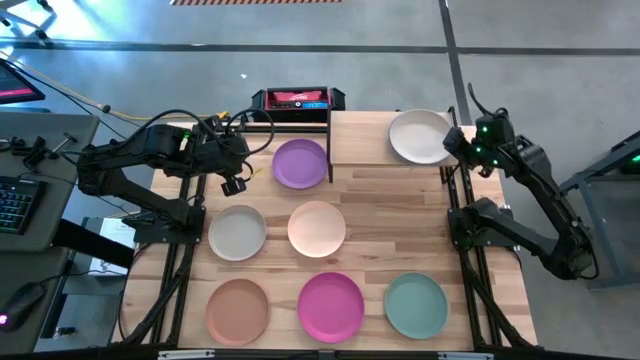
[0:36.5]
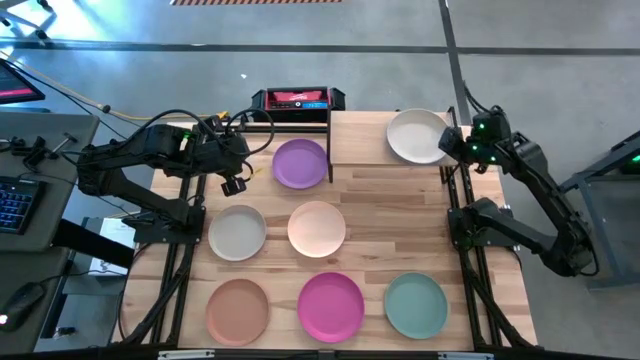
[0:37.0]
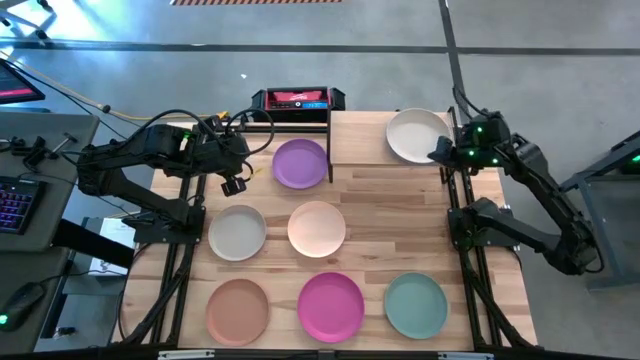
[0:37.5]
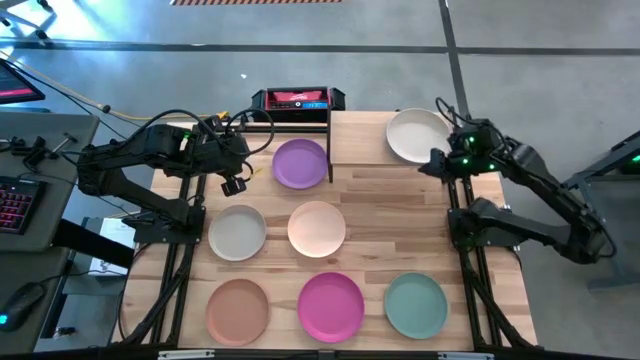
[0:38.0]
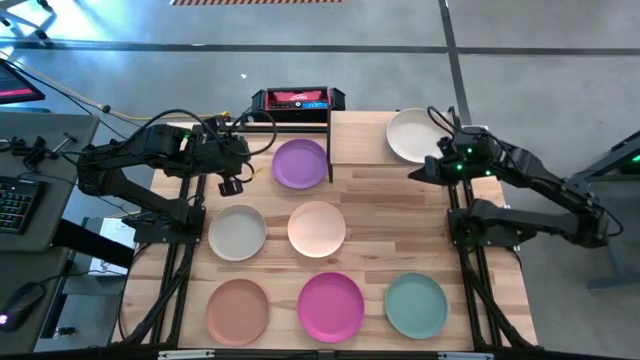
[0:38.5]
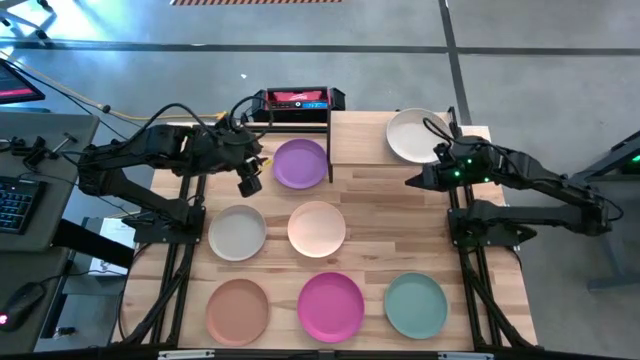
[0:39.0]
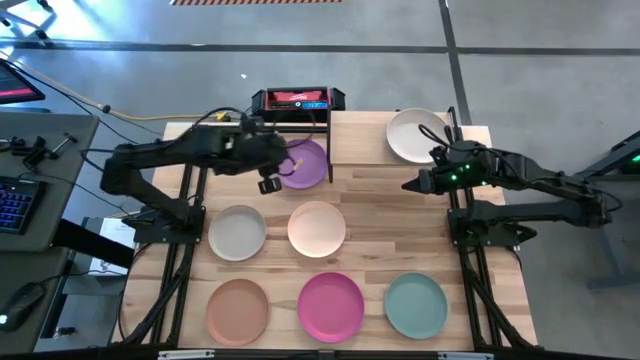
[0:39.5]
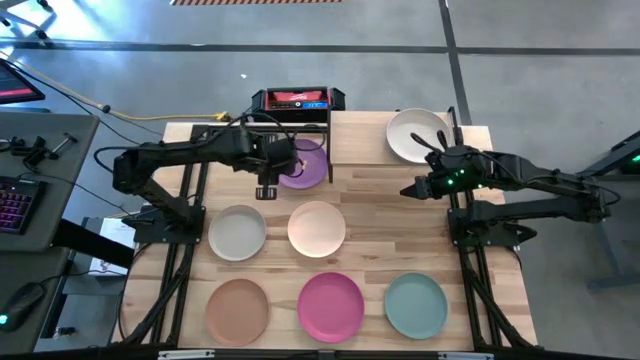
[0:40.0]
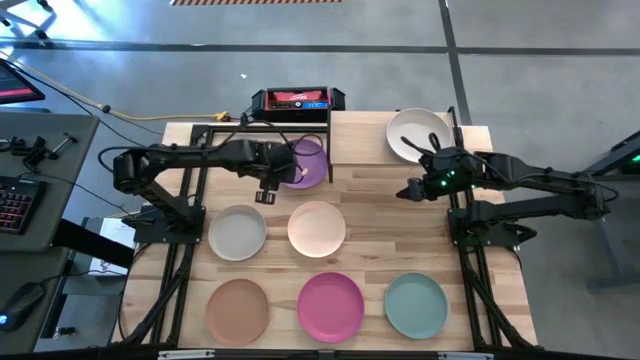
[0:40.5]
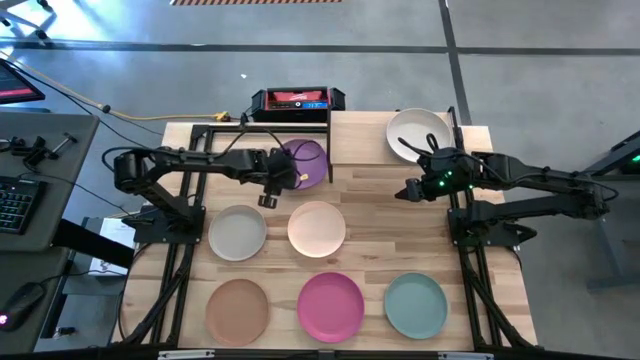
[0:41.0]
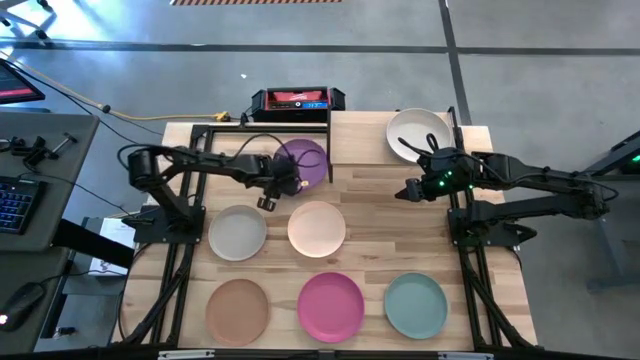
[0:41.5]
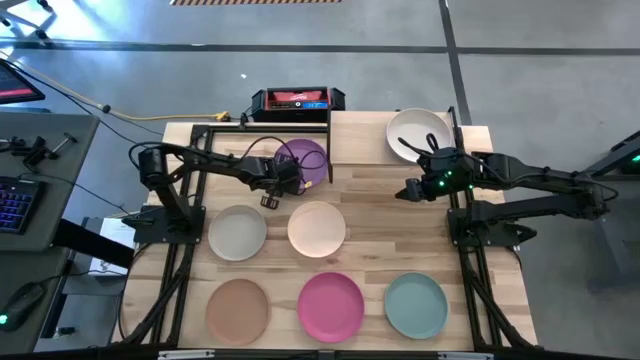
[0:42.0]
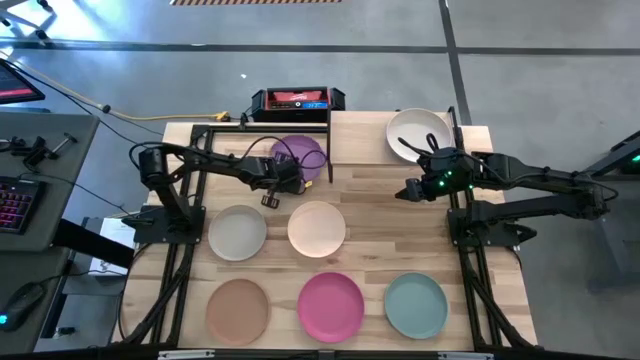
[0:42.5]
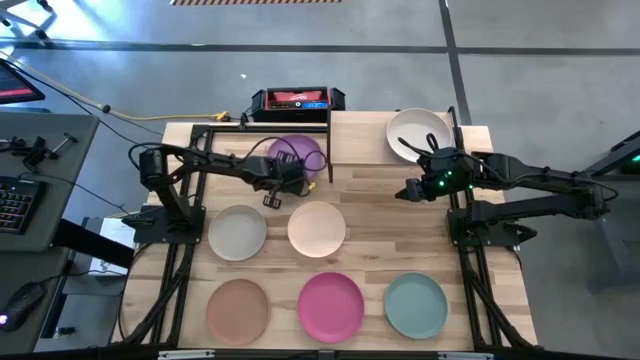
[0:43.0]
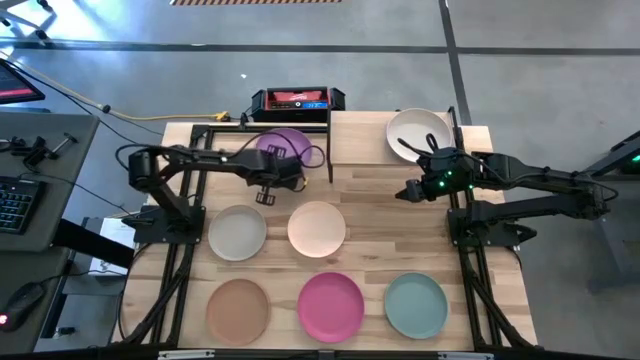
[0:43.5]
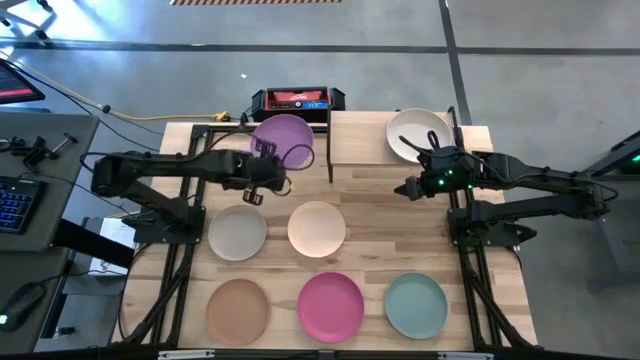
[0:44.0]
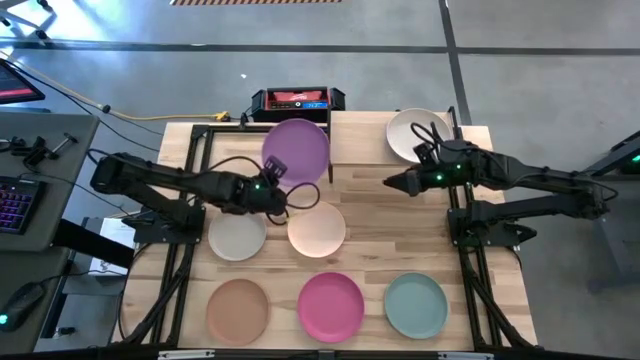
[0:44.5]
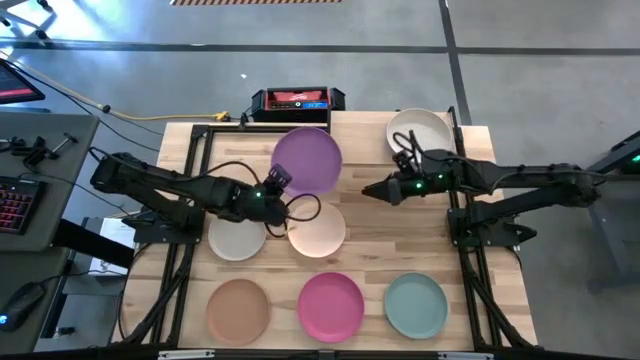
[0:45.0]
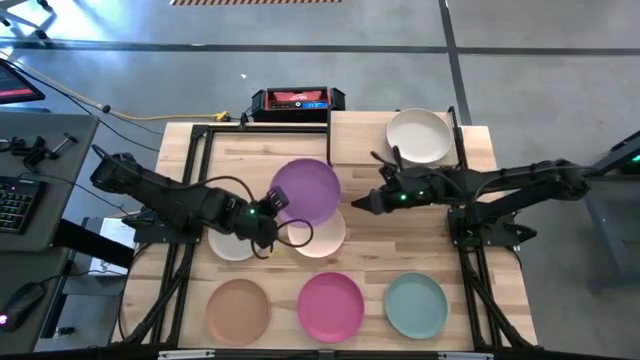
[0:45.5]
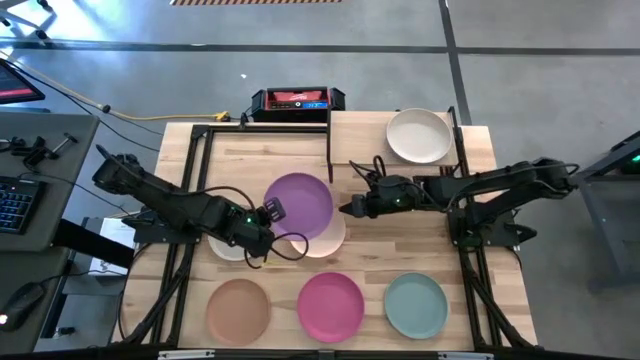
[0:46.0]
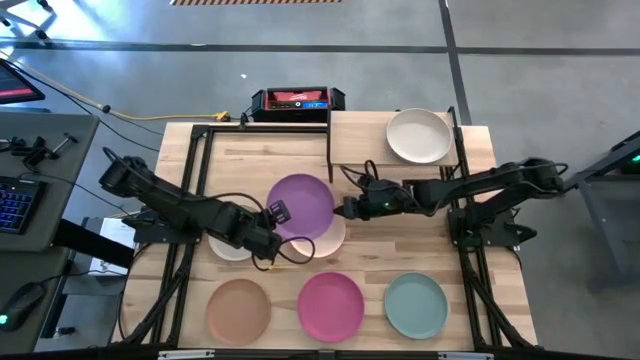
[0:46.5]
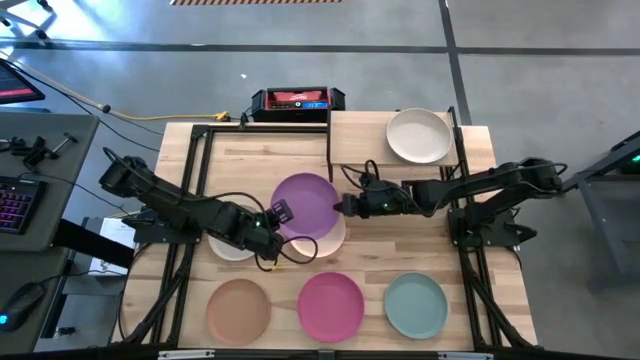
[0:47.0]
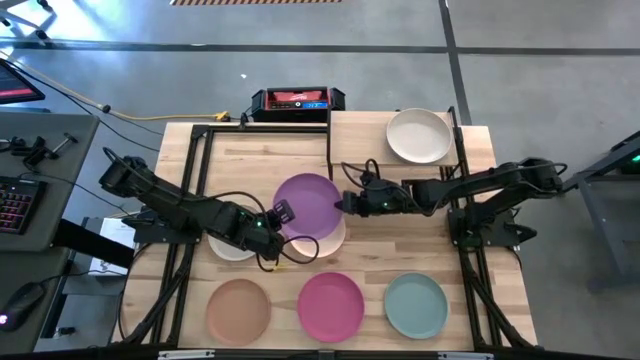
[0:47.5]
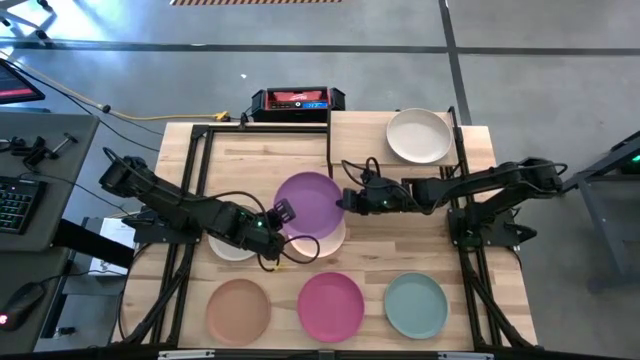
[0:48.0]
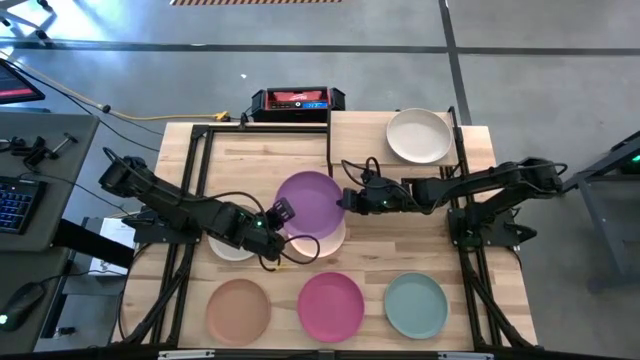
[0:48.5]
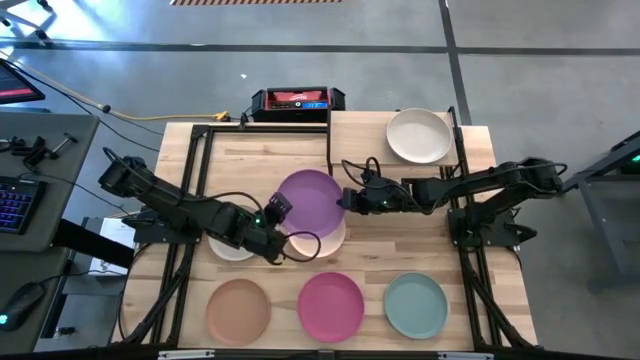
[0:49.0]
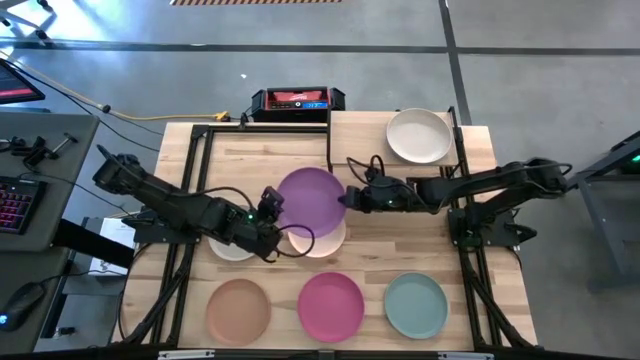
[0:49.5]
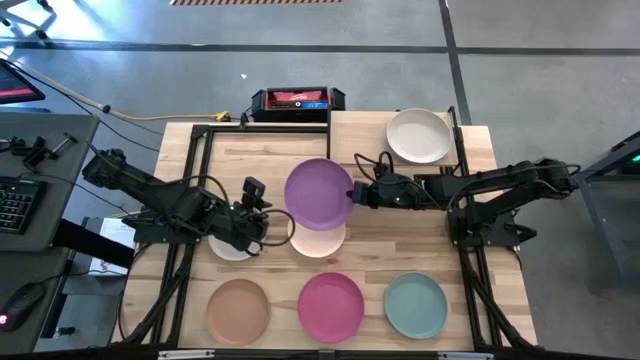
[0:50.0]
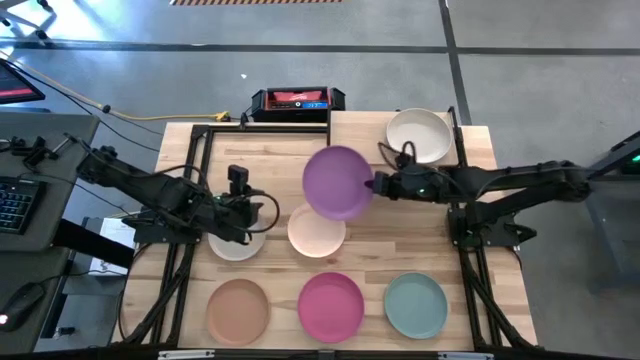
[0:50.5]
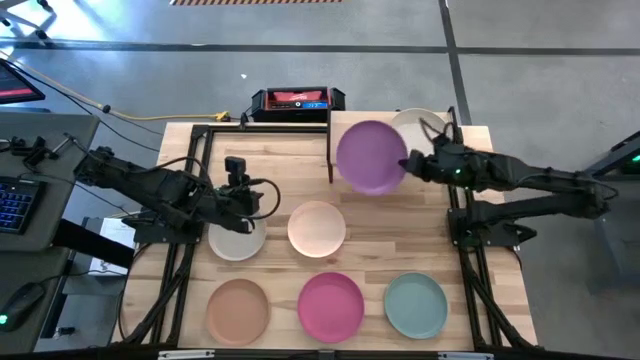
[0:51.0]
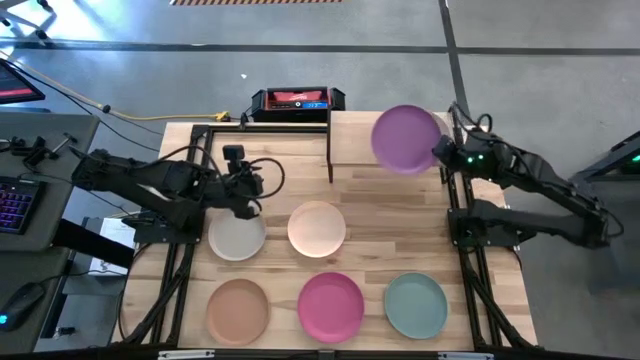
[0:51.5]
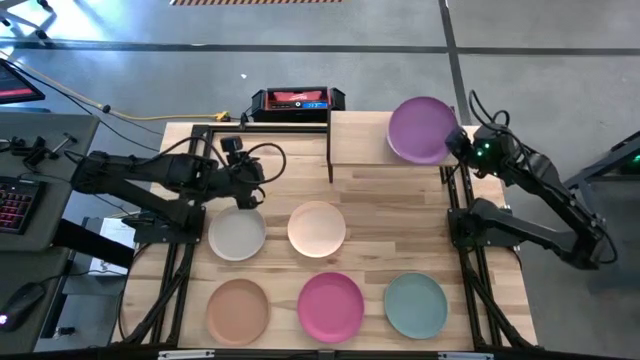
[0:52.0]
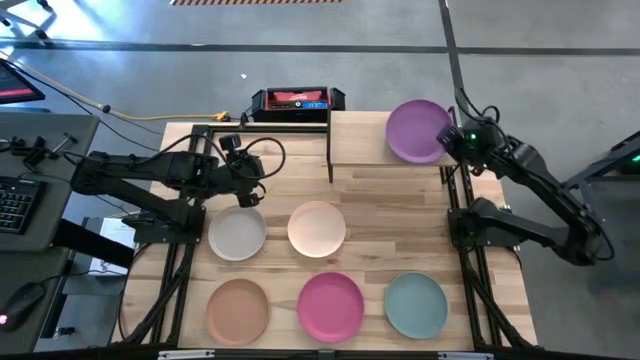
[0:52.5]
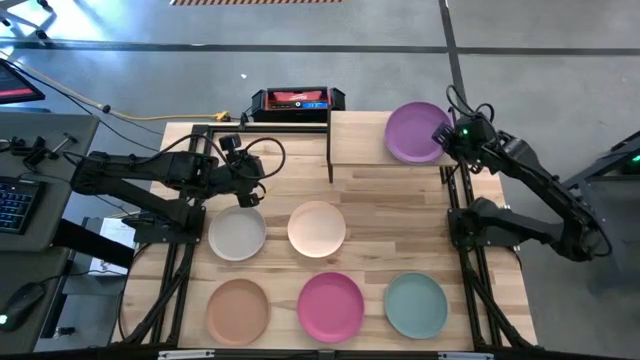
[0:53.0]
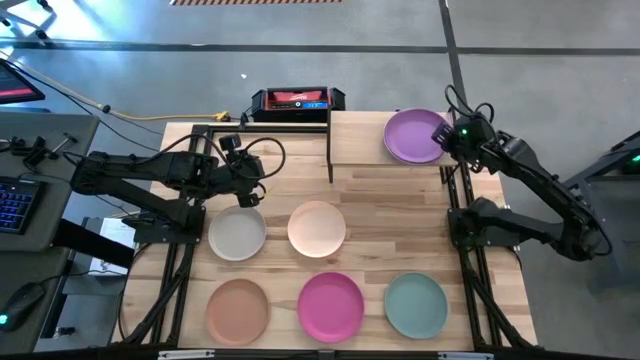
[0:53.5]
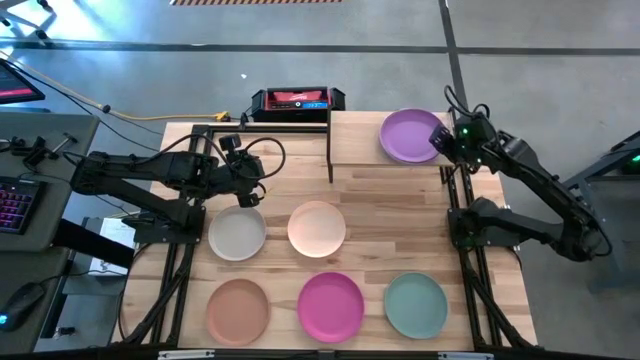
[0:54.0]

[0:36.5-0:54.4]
Task: Place and stack plates onto a shelf
Stack the purple plate on top of the white plate on the shelf

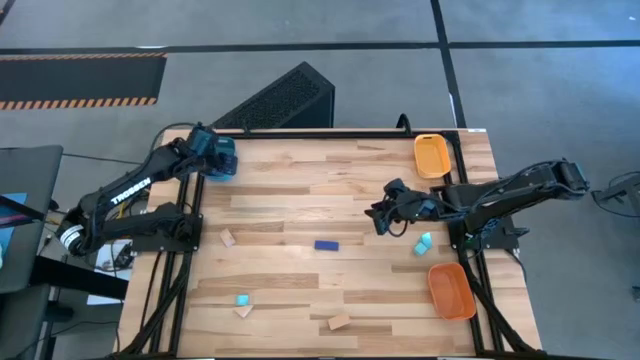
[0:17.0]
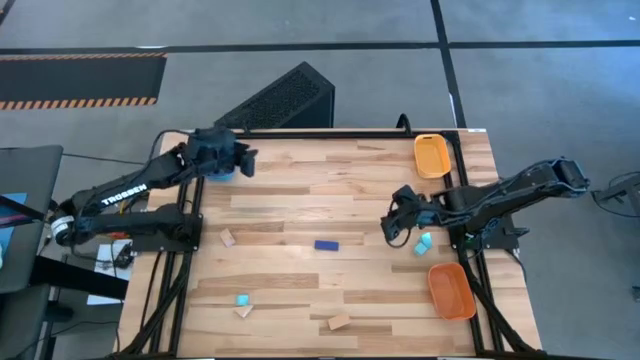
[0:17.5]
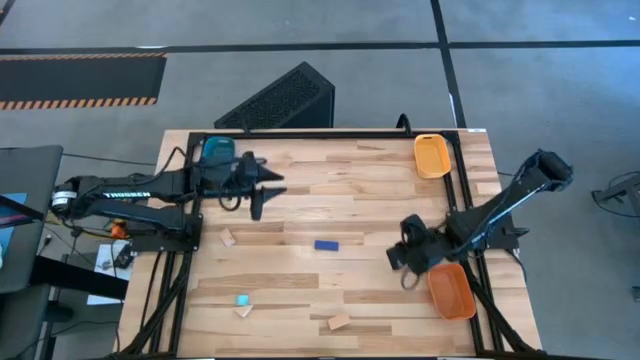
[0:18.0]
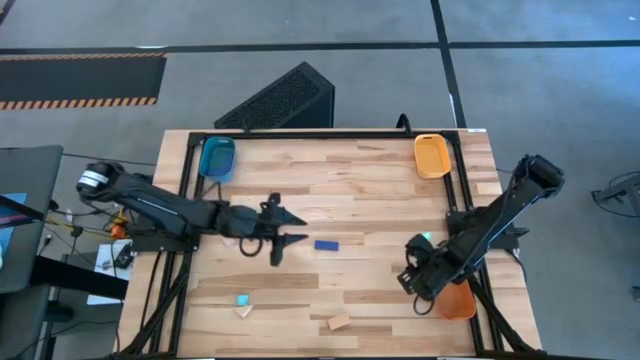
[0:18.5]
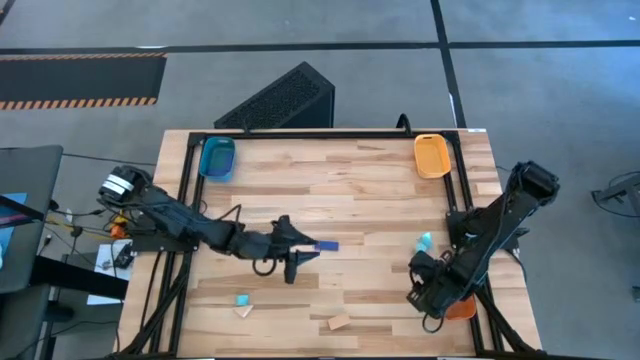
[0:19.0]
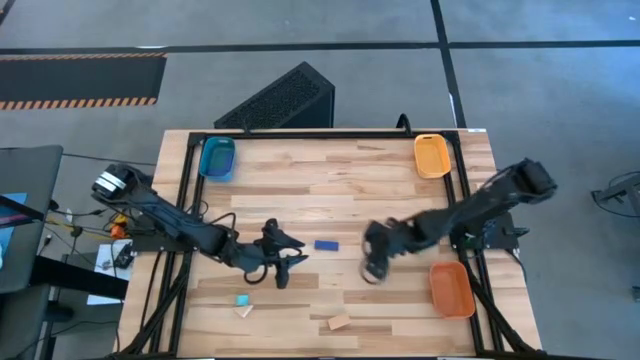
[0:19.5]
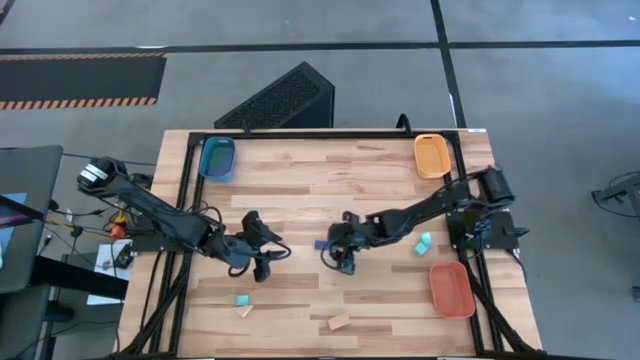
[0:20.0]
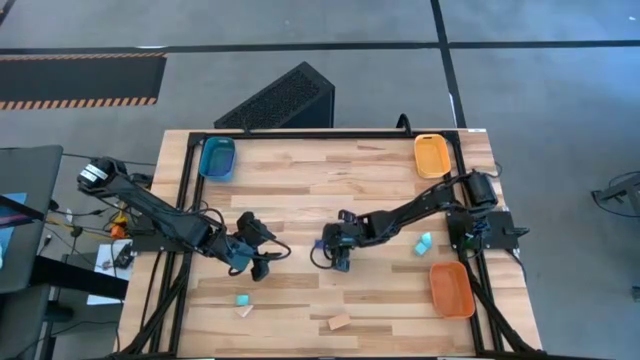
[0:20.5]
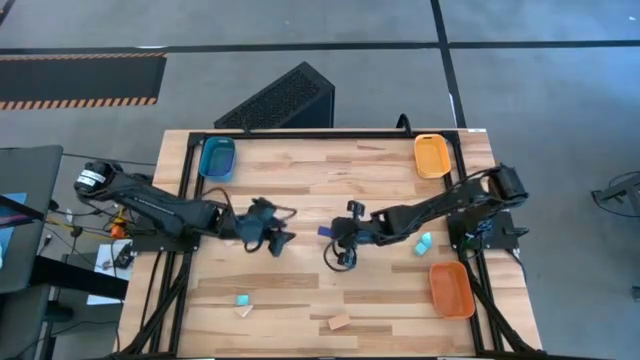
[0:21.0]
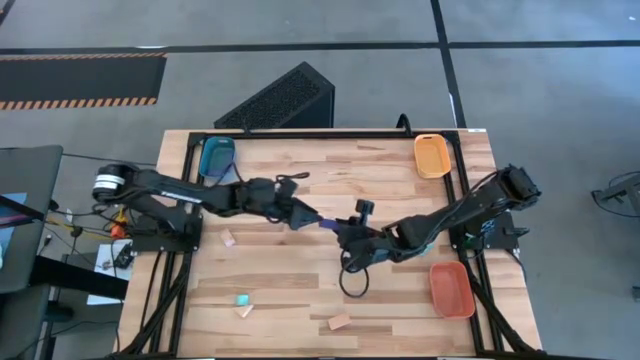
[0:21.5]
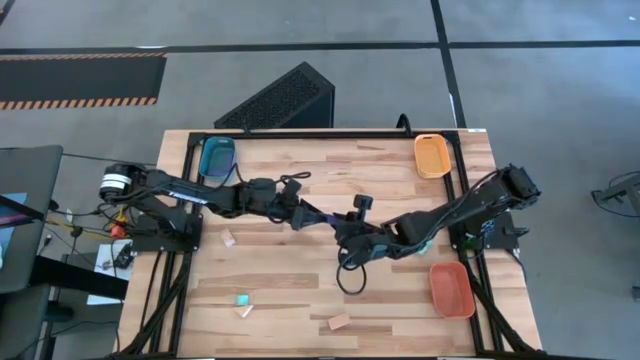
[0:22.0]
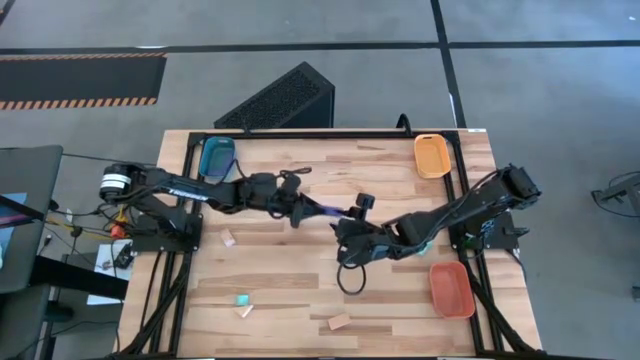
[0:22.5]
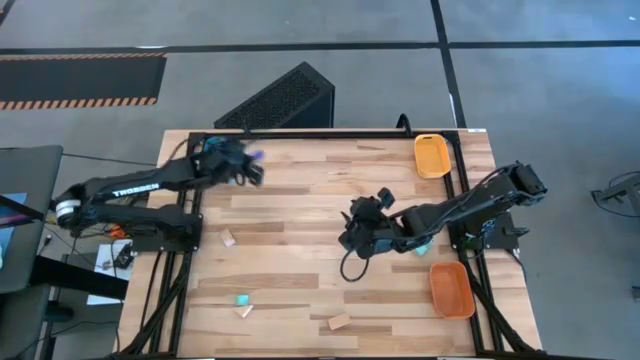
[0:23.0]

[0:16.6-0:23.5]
Task: Sort & place blocks by color
Put the blue block into the blue bin
